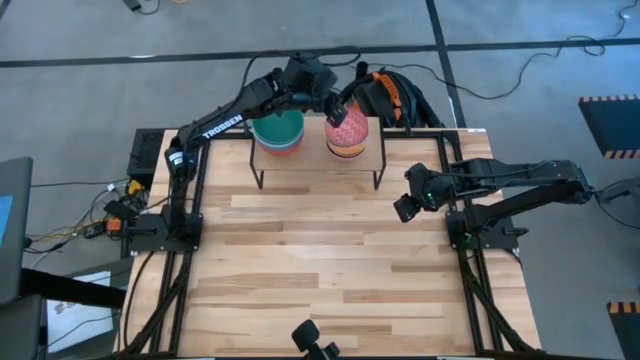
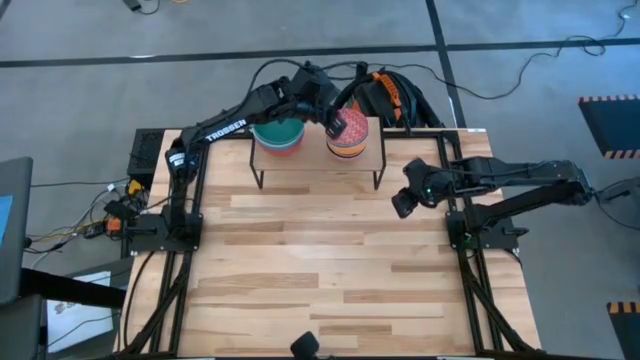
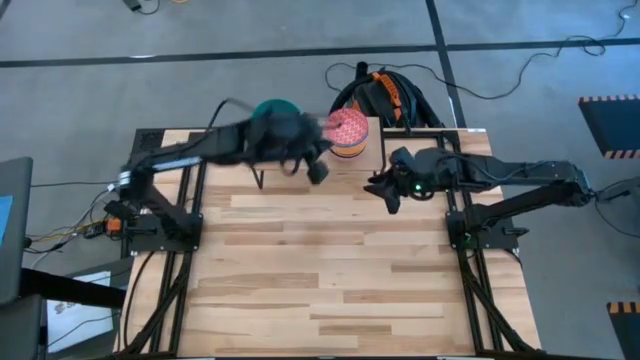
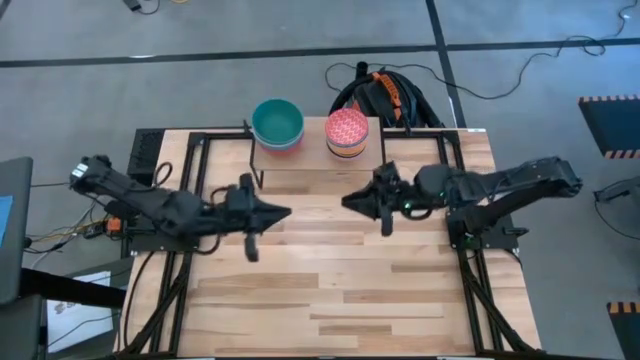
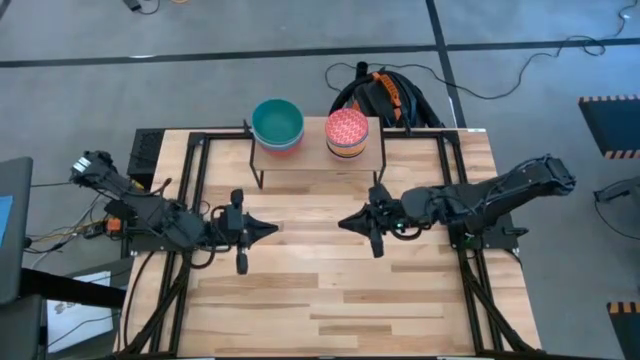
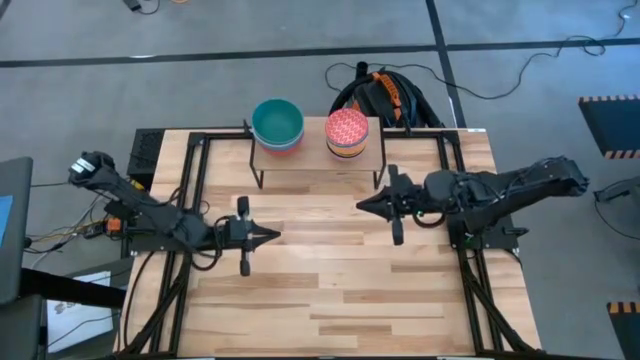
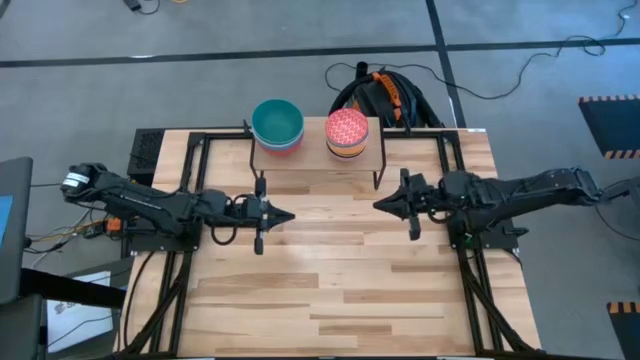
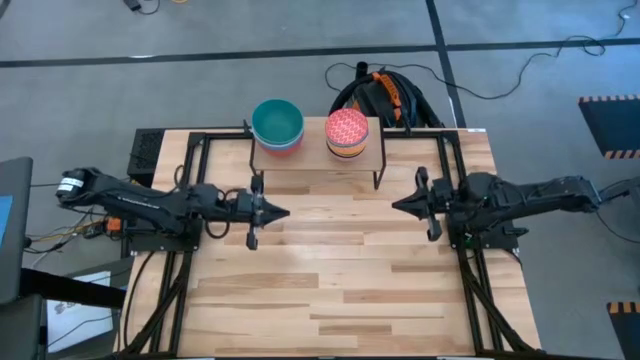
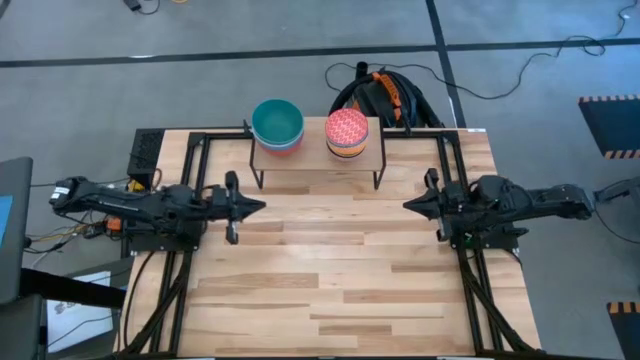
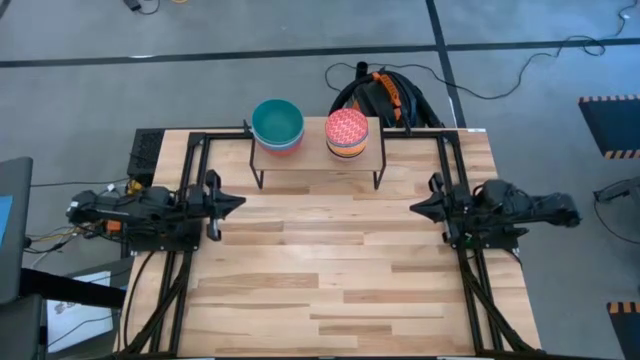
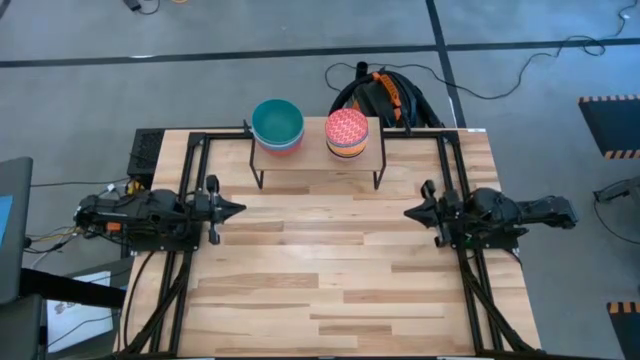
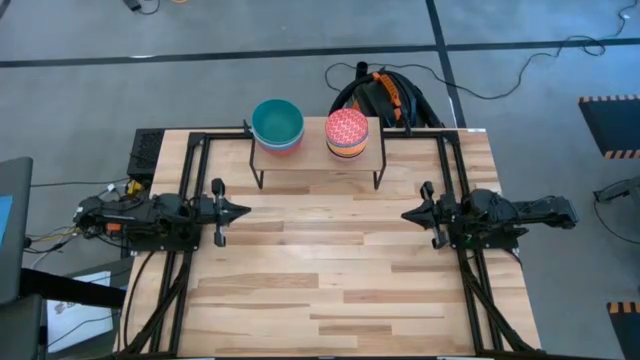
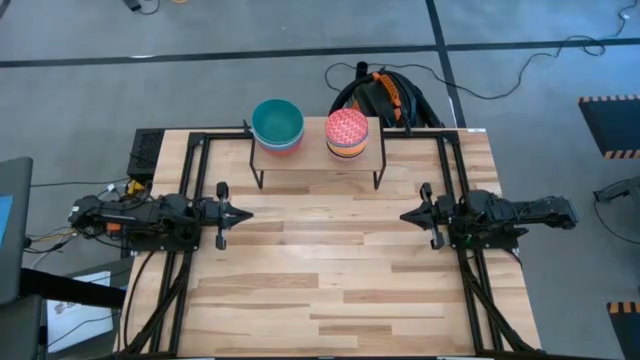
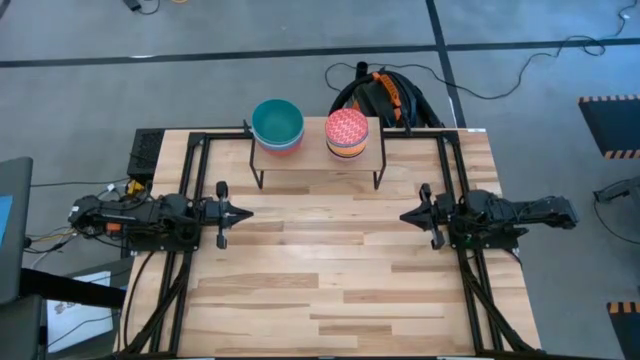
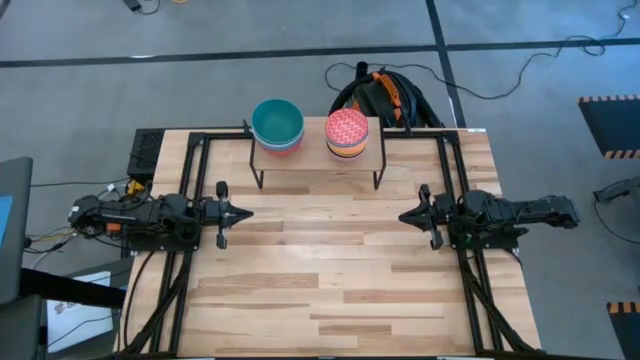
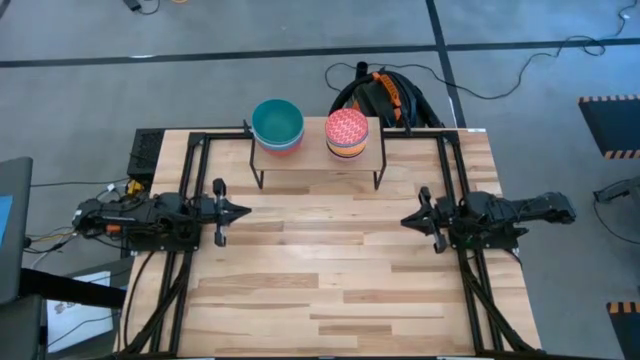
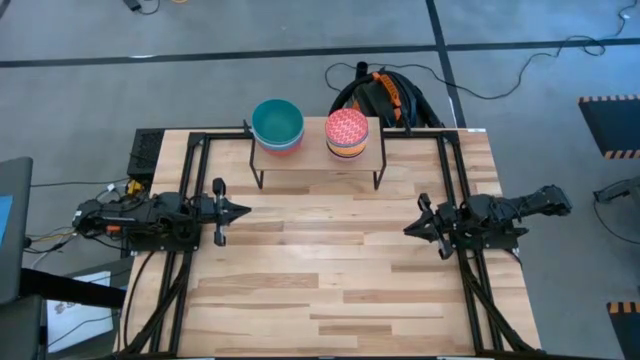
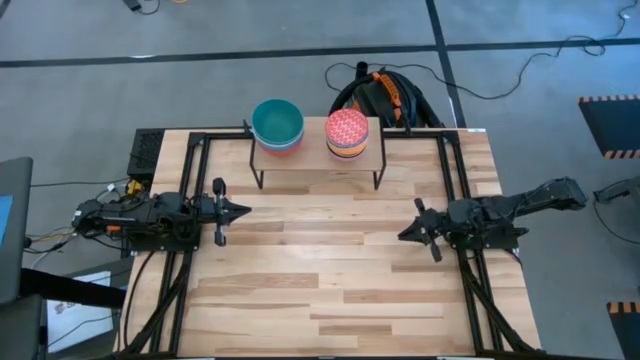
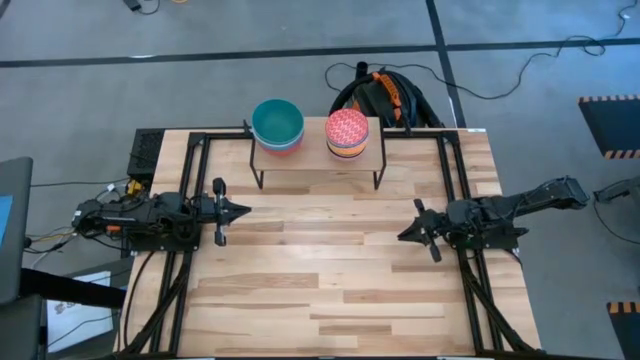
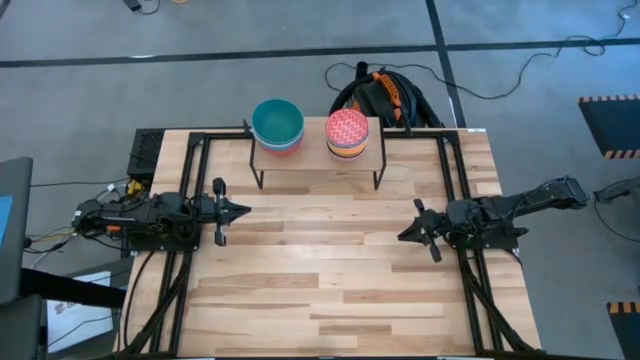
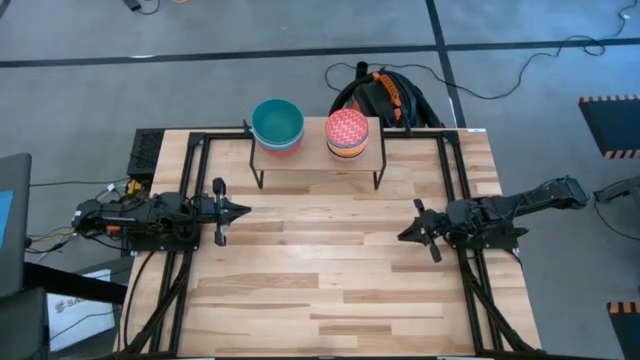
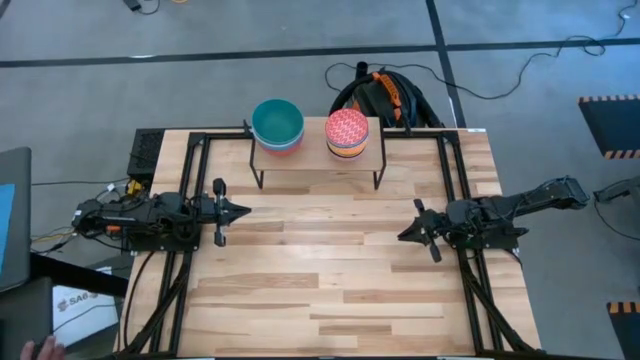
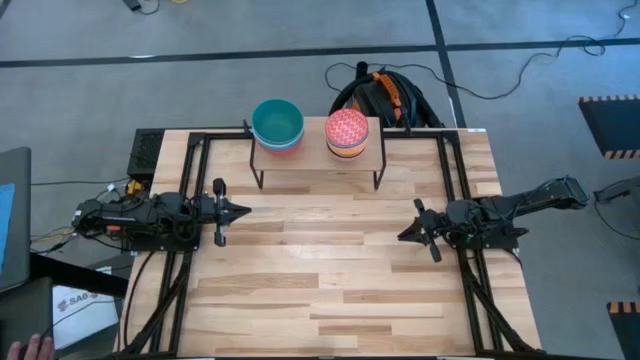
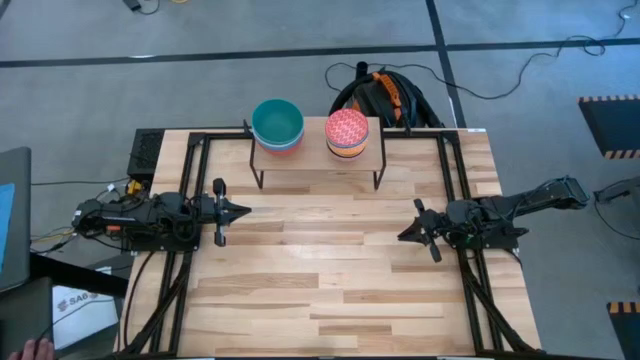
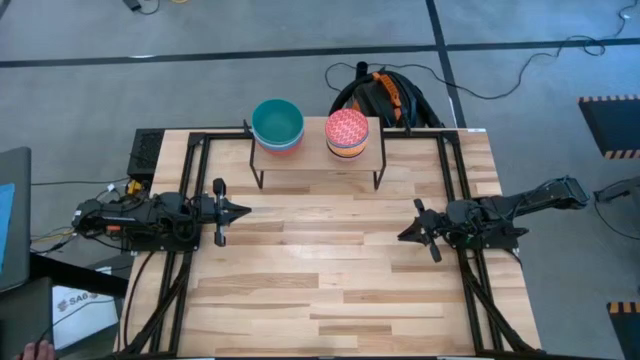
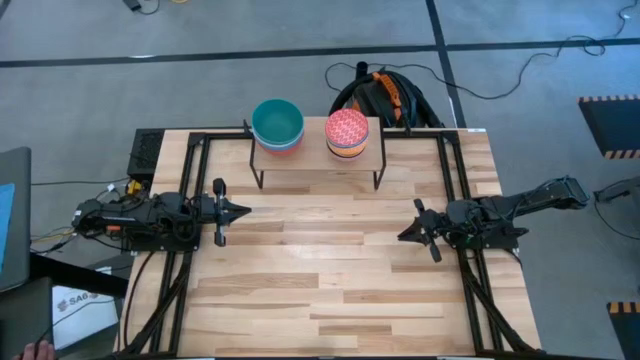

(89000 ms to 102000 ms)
Task: Place and stack bowls onto a shelf
Return to Home Position

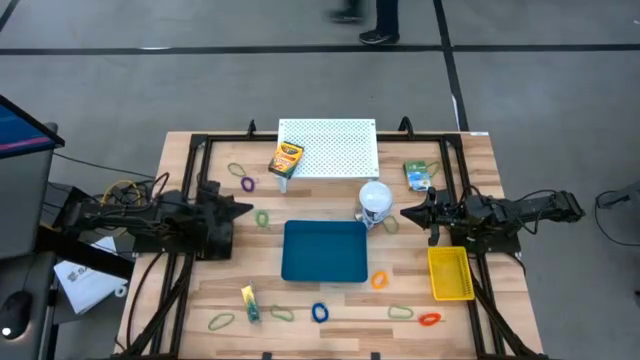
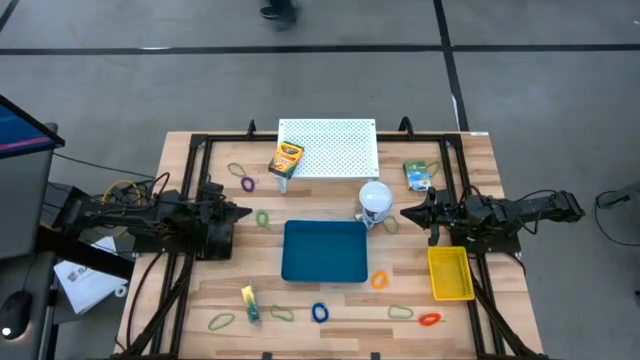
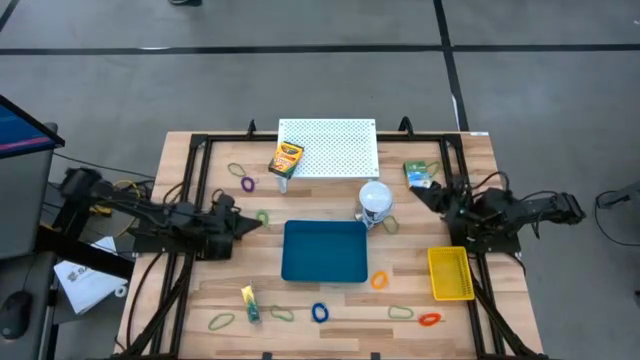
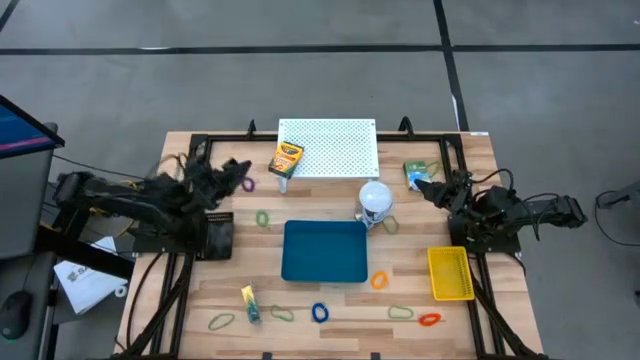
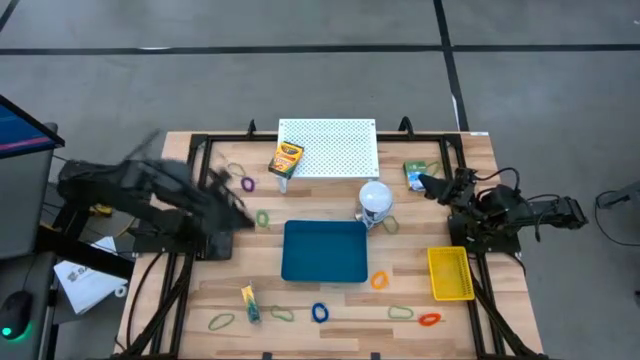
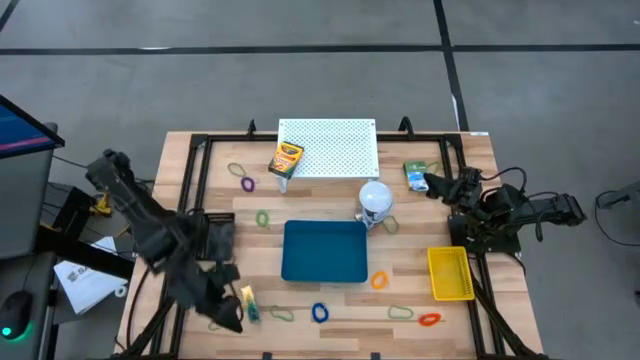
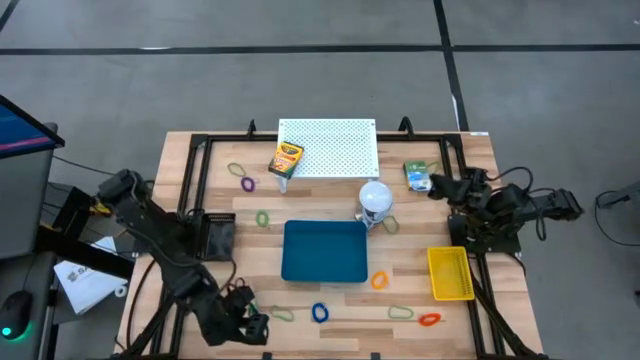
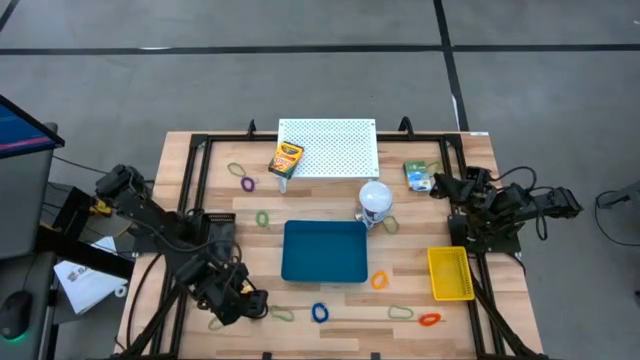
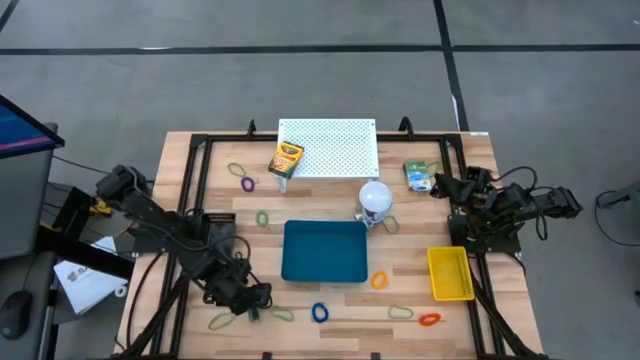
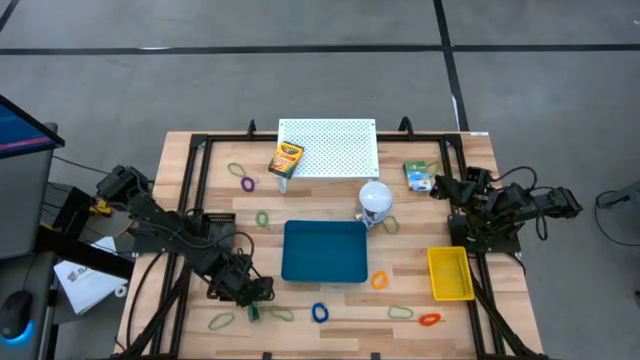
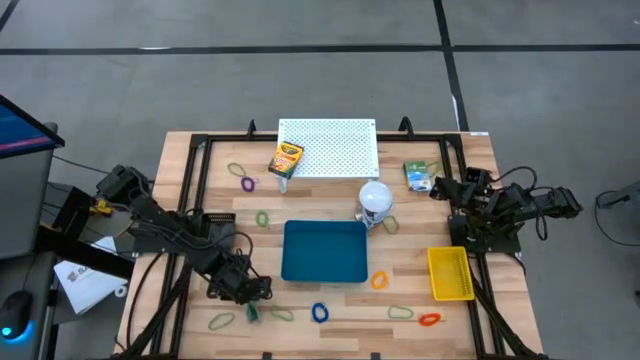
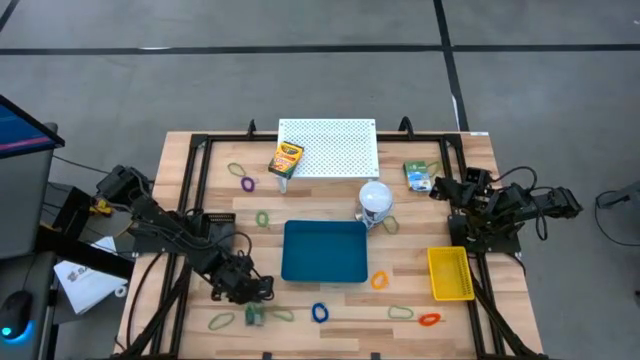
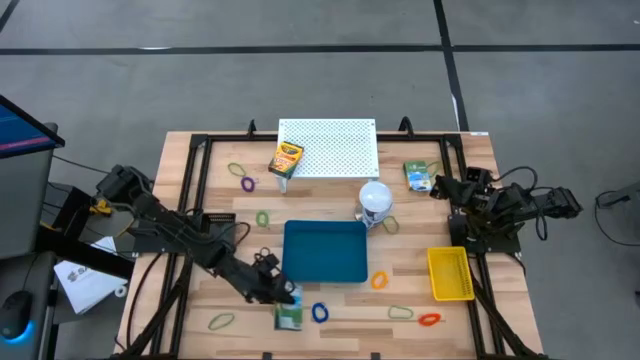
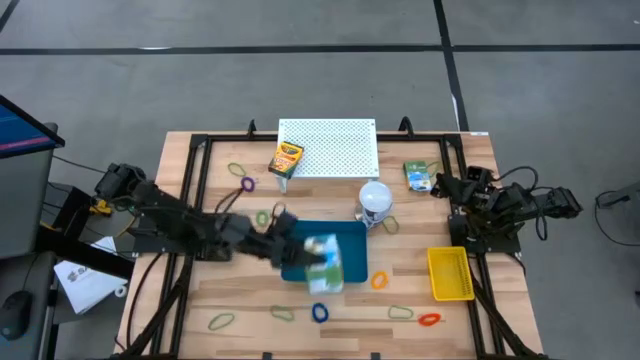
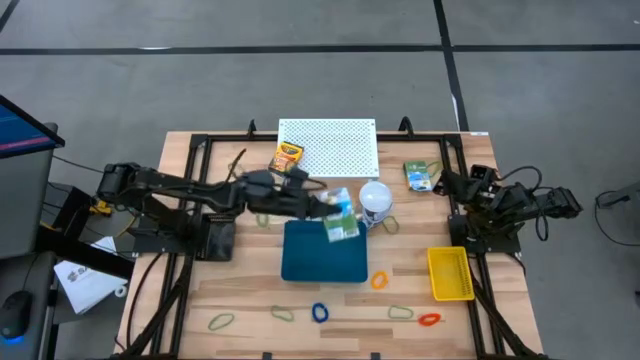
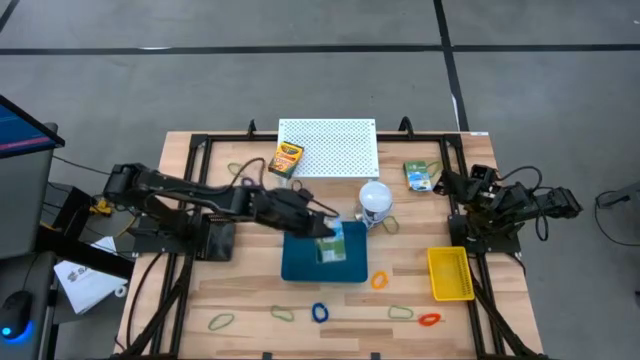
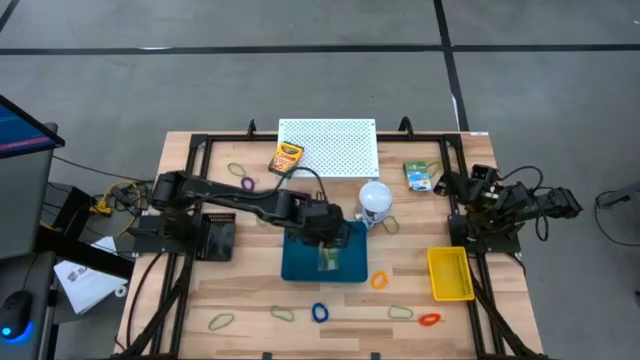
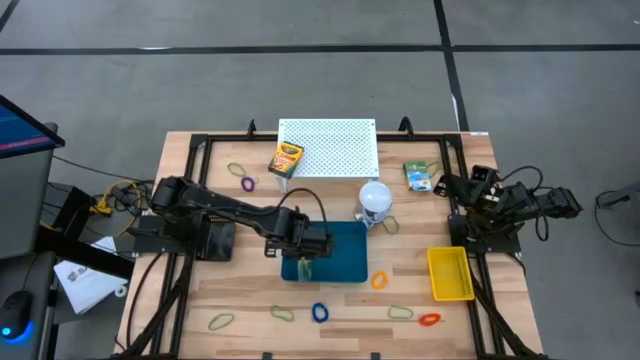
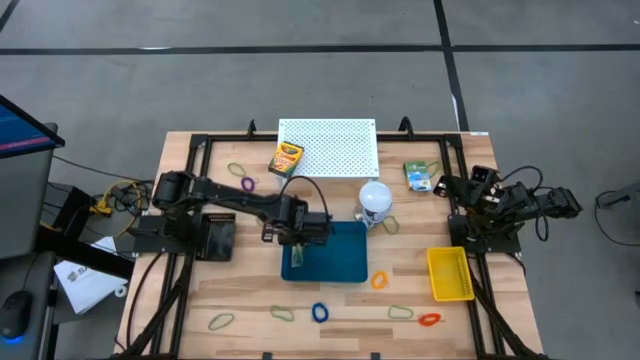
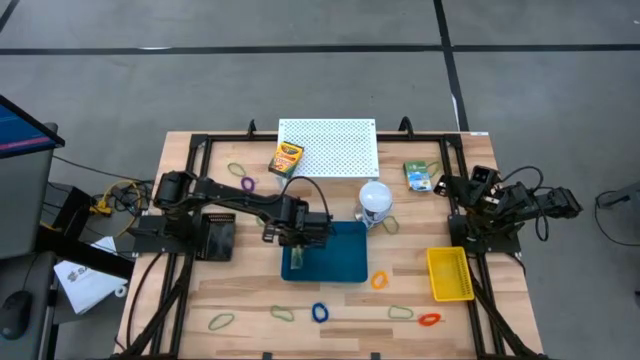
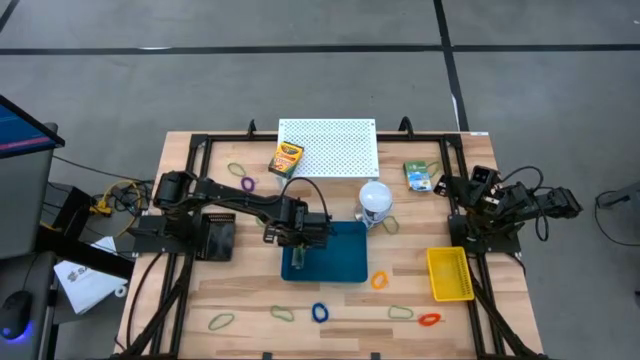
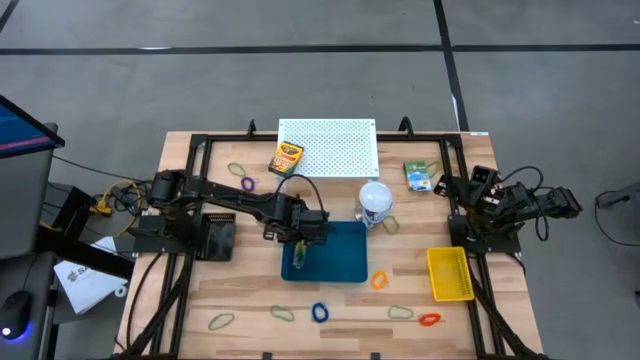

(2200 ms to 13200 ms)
Task: Pick & Place Office Desk Supplies
Put the bottom crayon box into the blue bin
